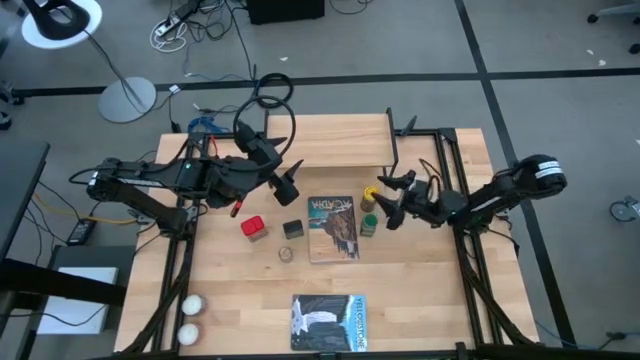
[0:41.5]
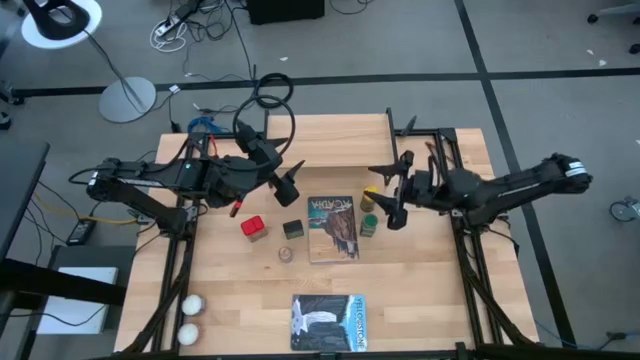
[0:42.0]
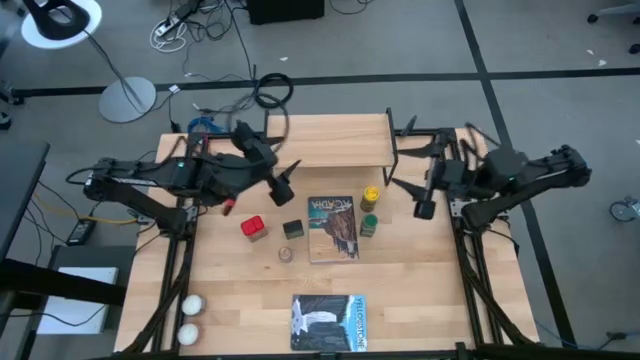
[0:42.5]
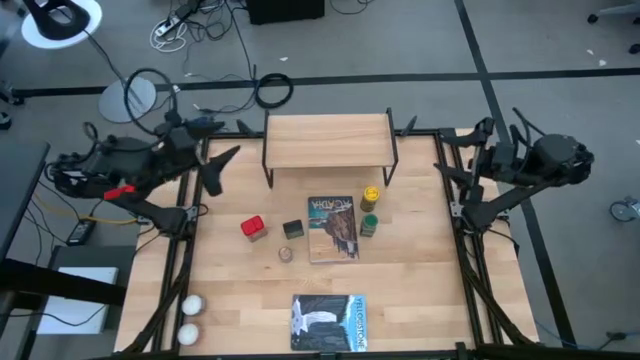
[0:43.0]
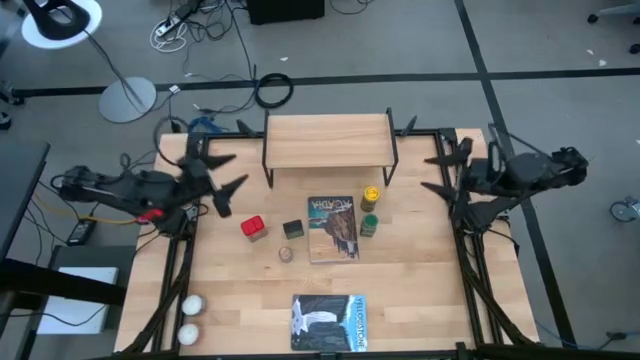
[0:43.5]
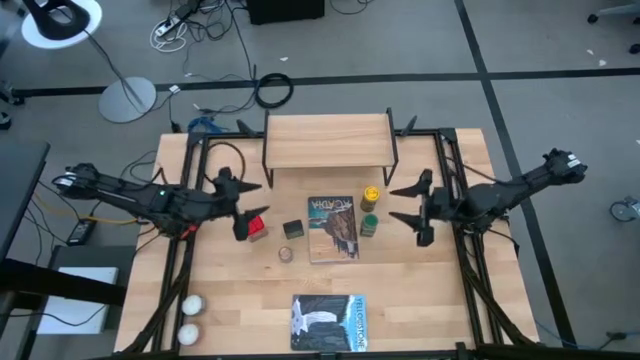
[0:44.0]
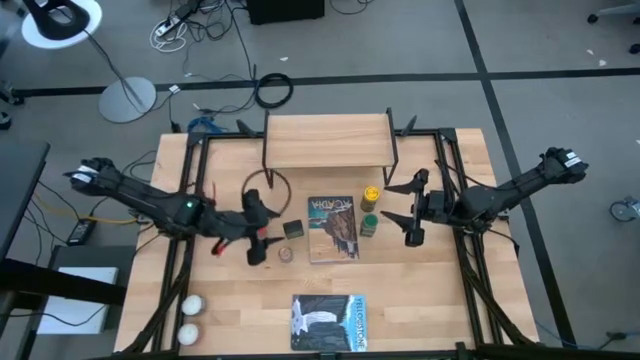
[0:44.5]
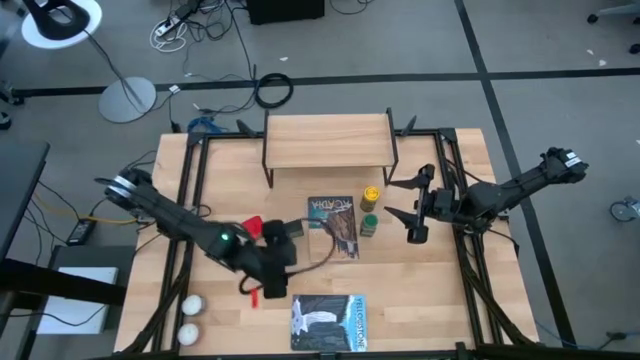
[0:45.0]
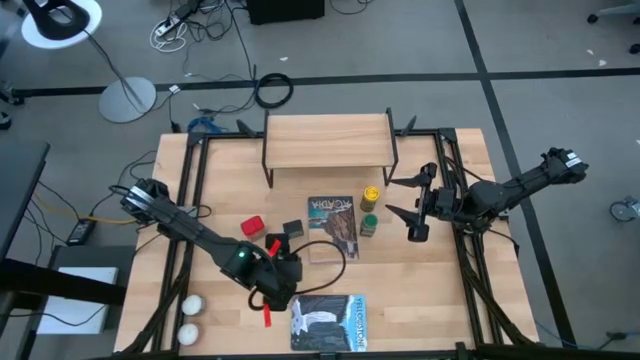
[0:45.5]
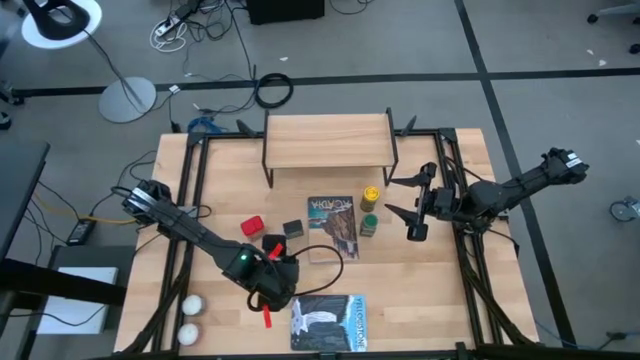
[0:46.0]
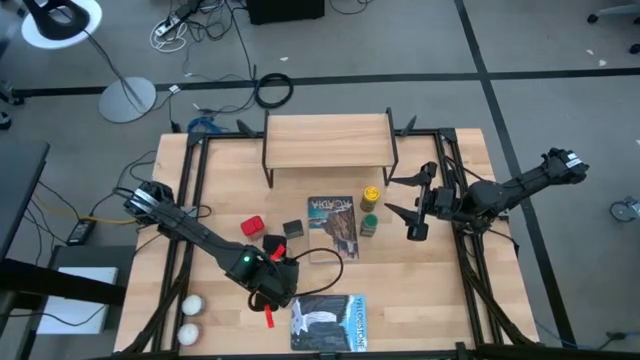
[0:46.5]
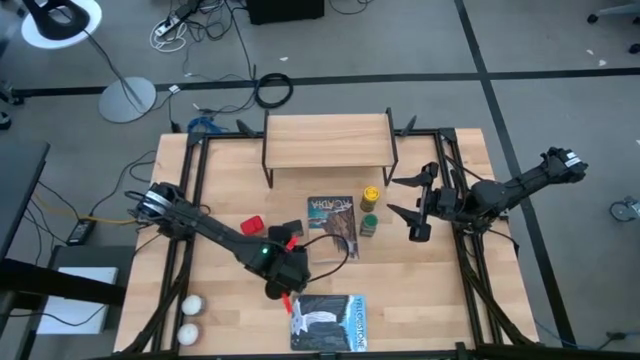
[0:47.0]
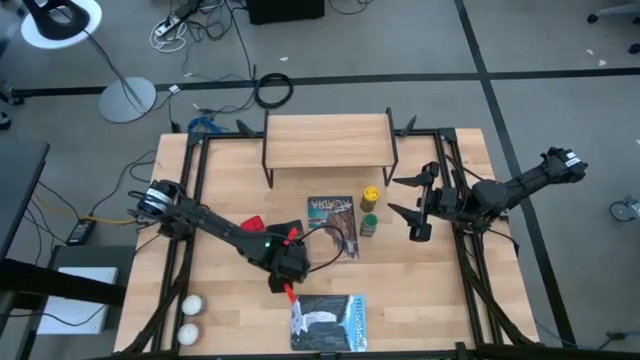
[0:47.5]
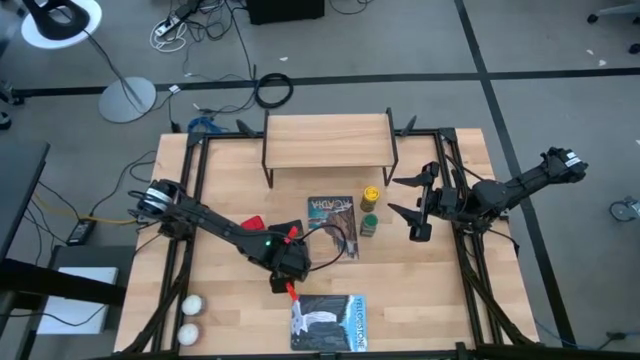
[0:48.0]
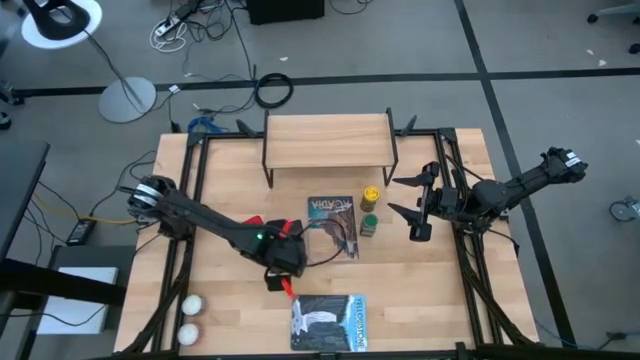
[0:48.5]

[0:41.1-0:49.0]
Task: Shelf spices
Put the brown seasoning bottle on the shelf

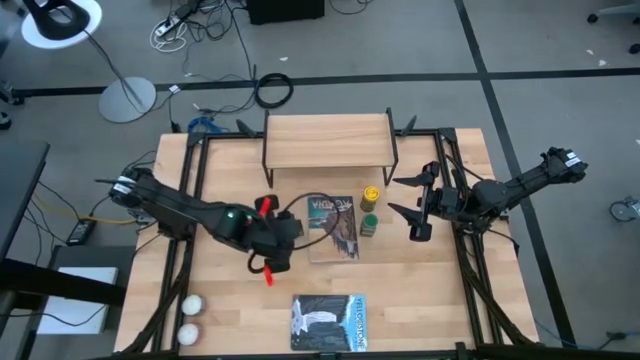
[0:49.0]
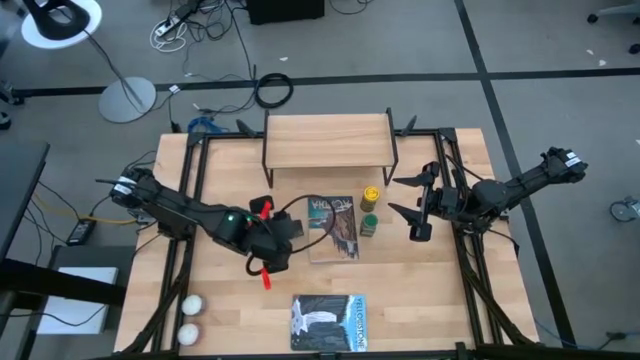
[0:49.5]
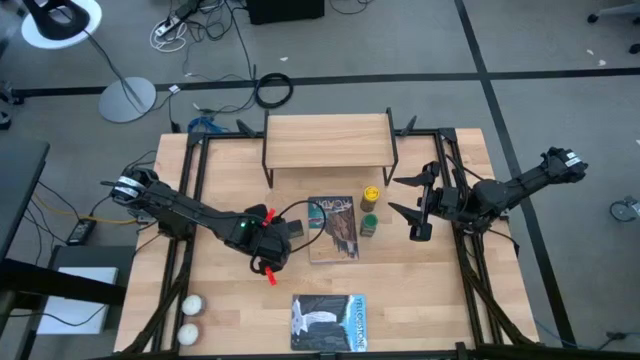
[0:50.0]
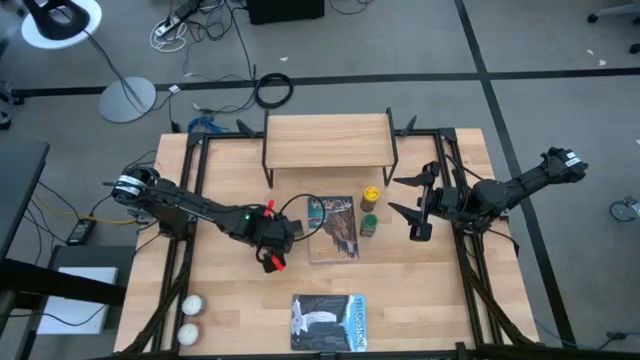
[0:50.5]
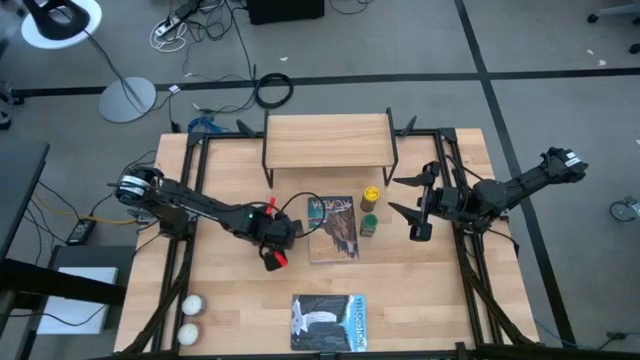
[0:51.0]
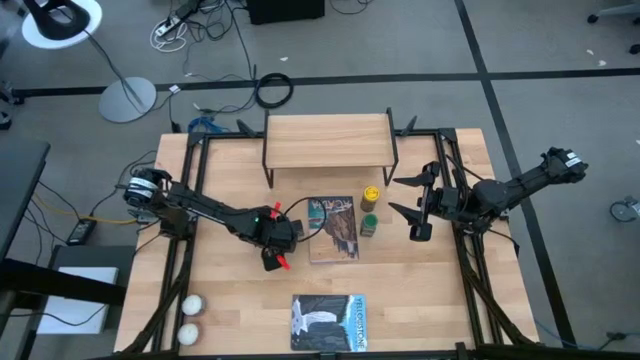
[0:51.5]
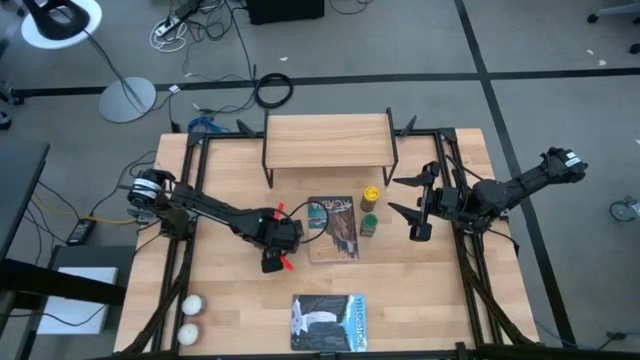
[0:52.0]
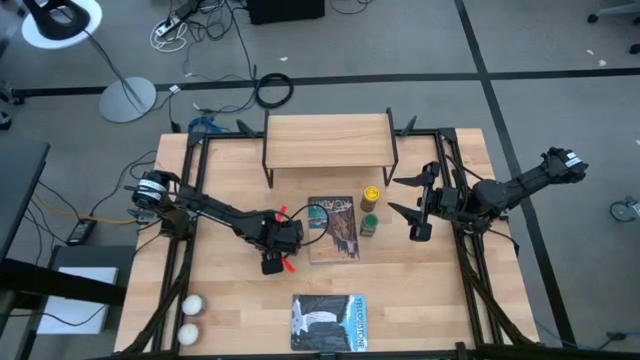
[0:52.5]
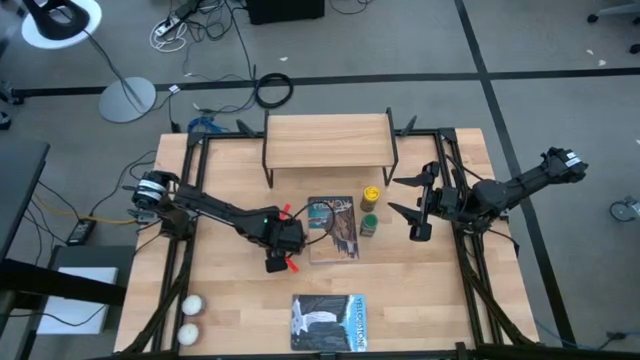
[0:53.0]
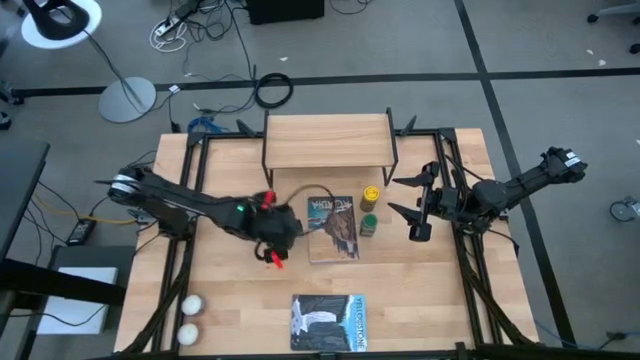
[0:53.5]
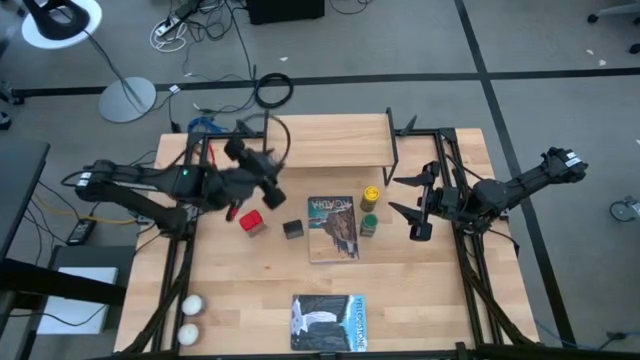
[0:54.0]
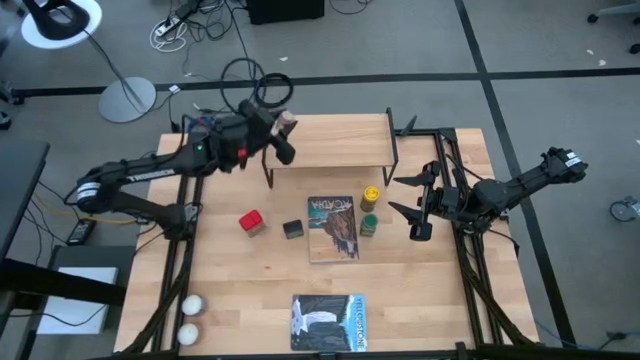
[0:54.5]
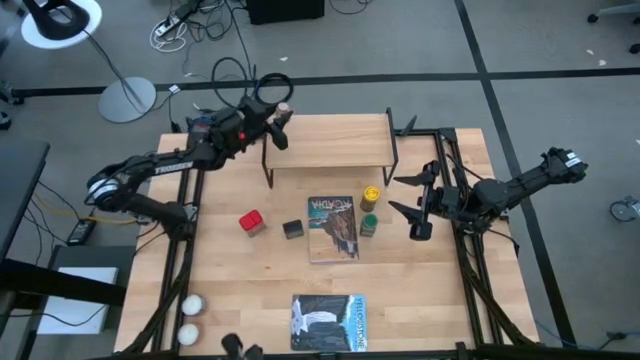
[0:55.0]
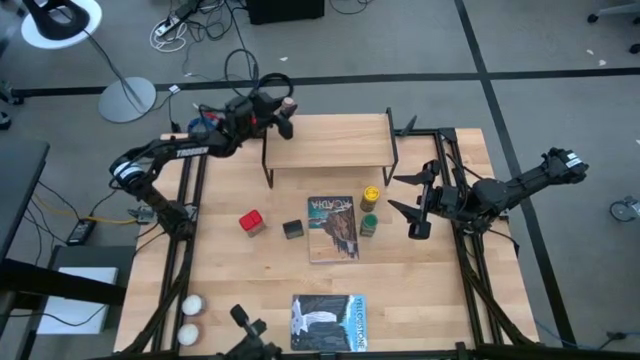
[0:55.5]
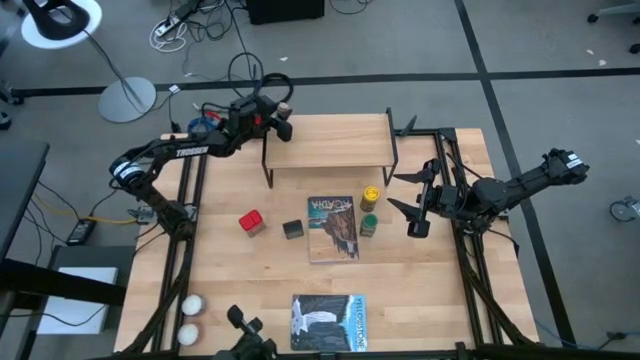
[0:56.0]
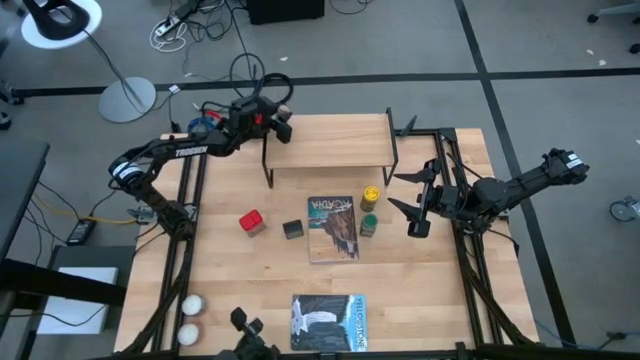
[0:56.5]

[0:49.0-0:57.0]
Put the brown seasoning bottle on the shelf

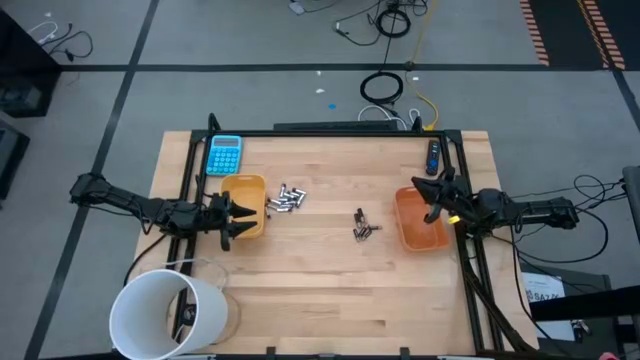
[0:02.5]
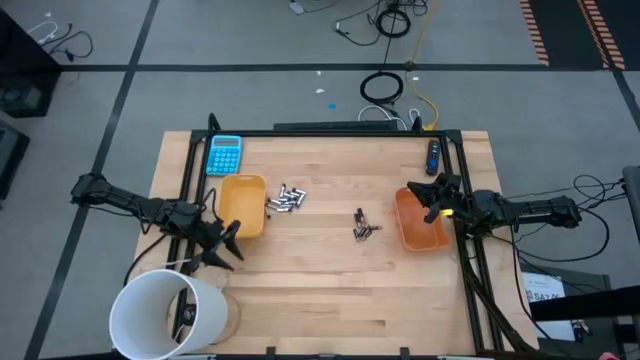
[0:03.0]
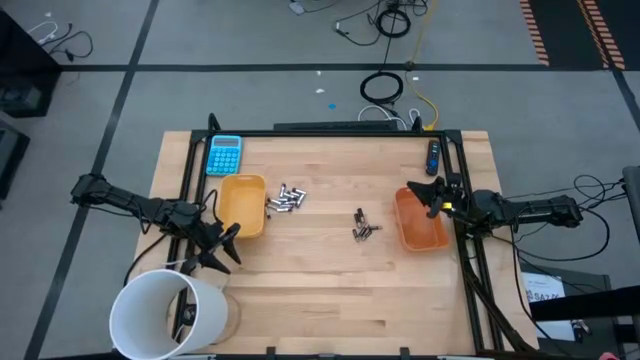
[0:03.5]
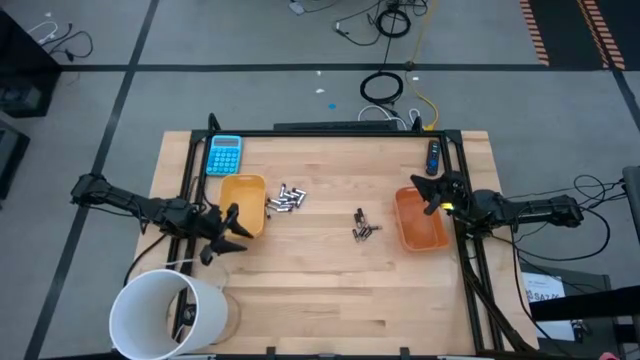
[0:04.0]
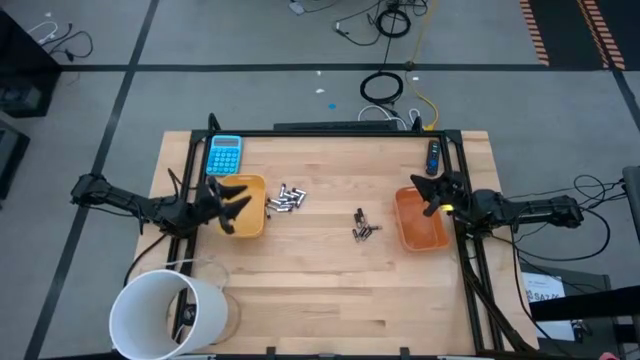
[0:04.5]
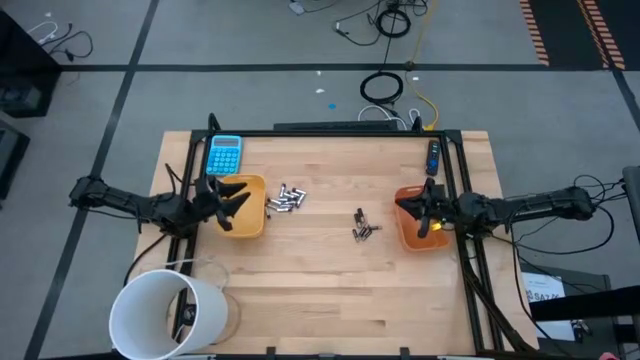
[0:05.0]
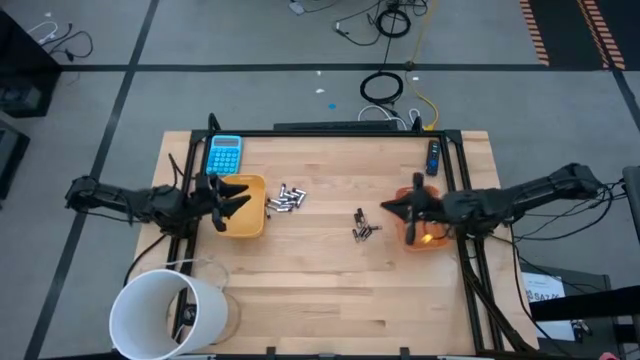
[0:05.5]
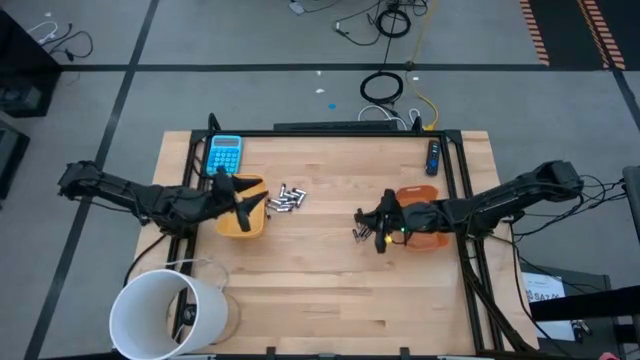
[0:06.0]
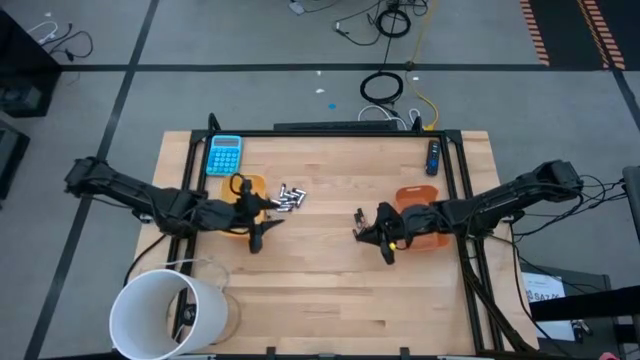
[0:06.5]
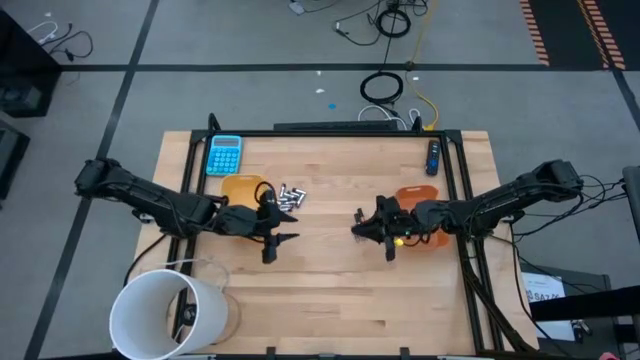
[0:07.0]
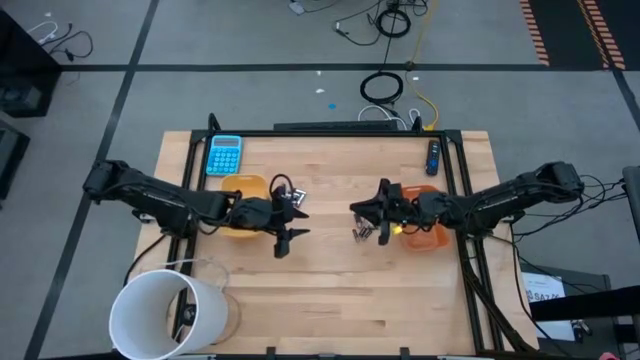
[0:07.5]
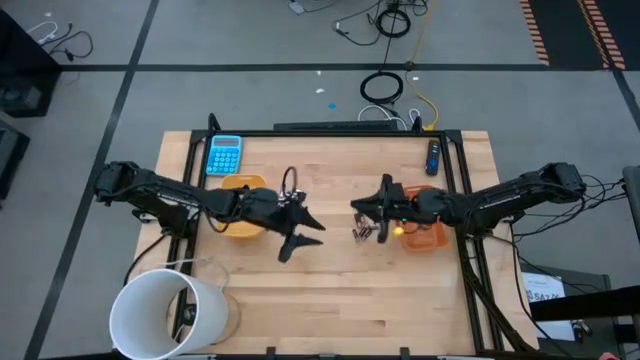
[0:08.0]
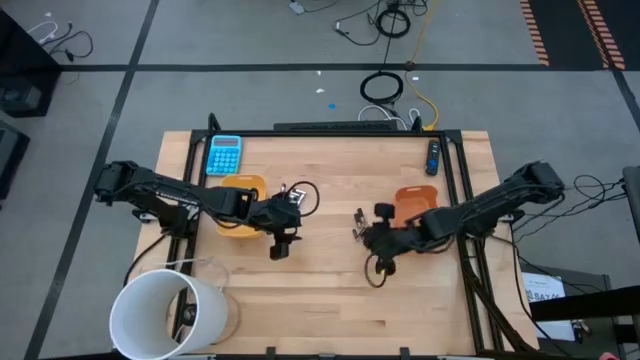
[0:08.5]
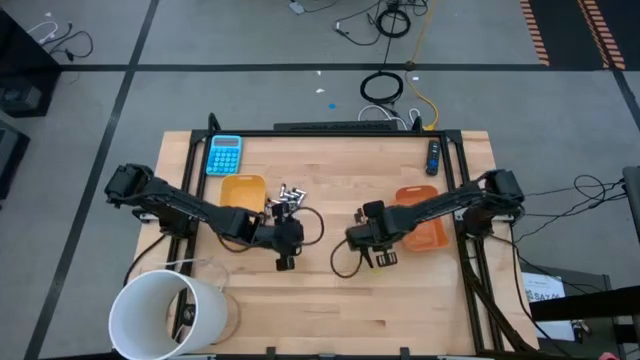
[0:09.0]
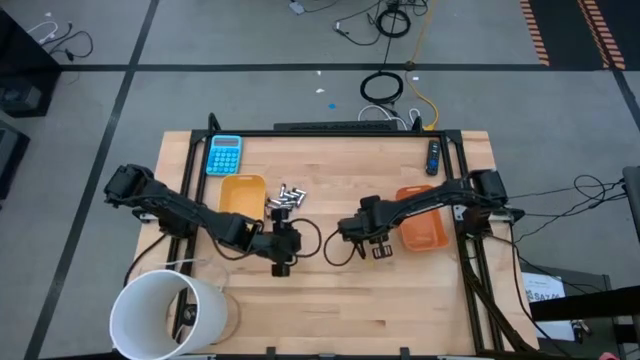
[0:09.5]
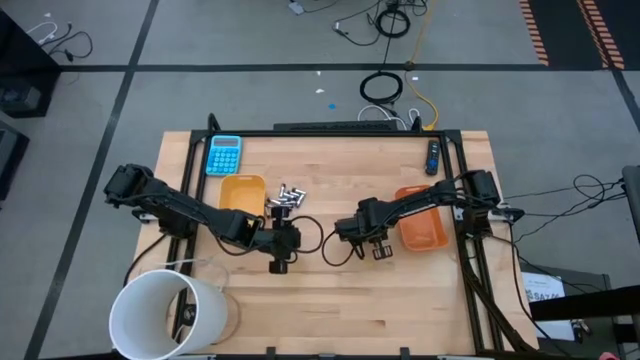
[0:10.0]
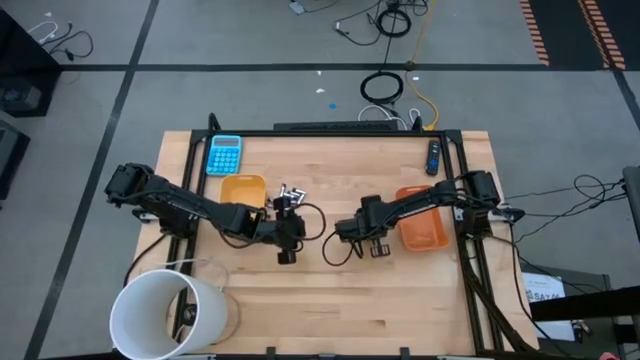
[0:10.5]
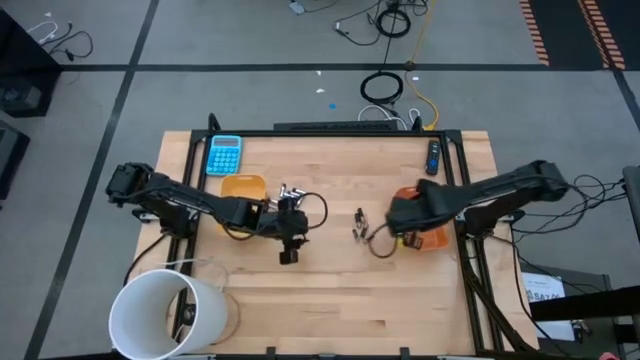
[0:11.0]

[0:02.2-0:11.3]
Task: Sort batteries
Put the black battery into the orange bin
